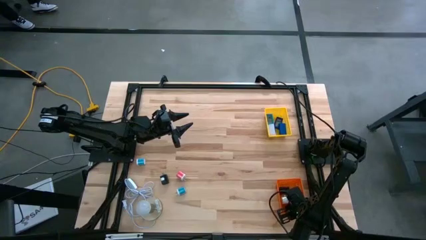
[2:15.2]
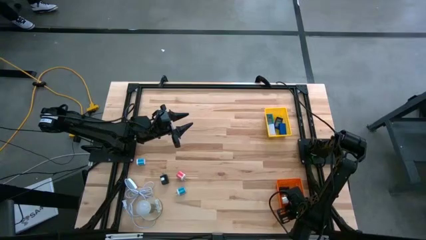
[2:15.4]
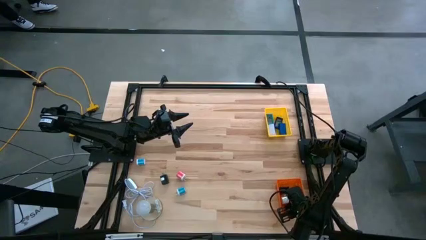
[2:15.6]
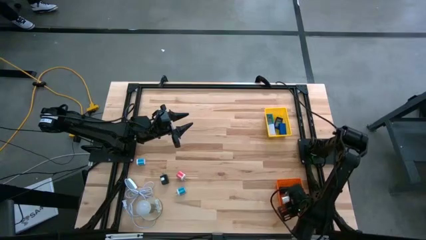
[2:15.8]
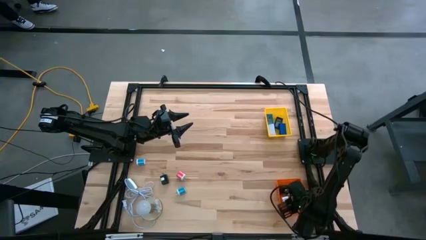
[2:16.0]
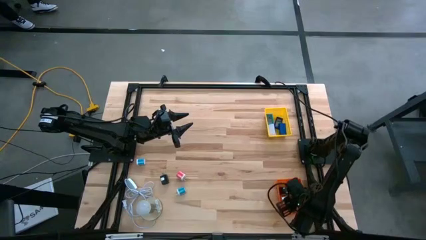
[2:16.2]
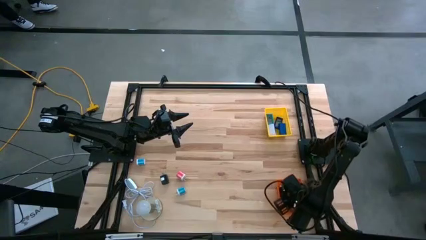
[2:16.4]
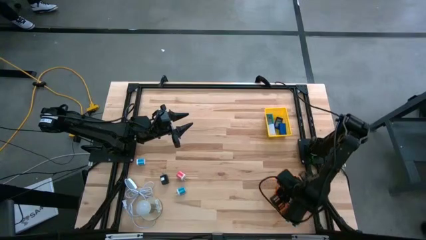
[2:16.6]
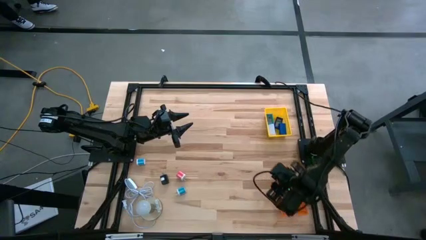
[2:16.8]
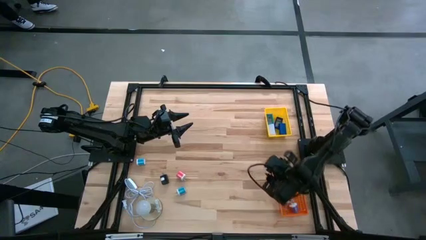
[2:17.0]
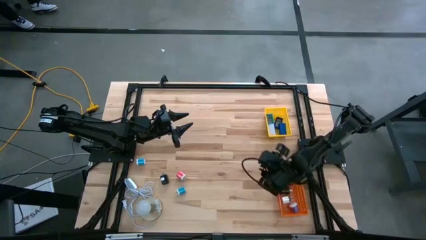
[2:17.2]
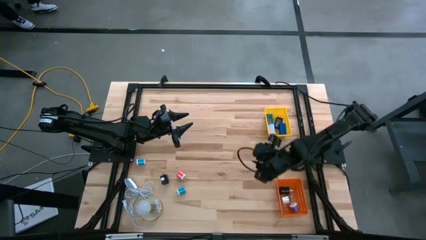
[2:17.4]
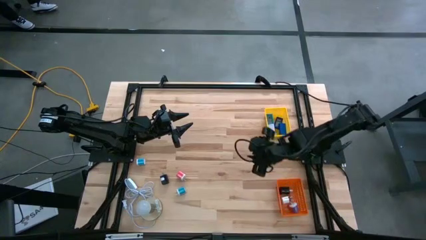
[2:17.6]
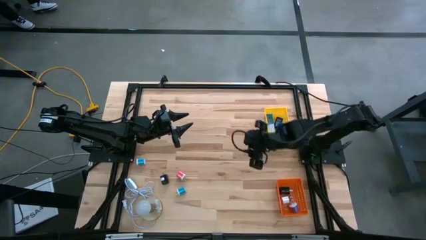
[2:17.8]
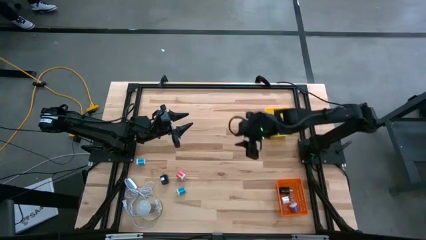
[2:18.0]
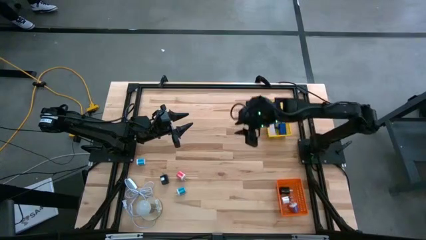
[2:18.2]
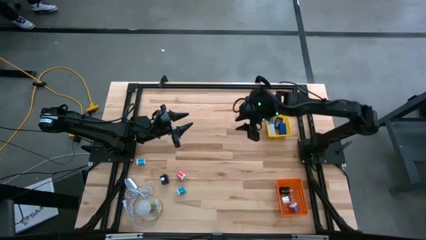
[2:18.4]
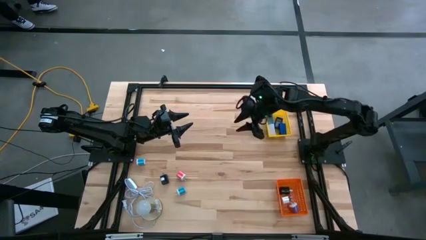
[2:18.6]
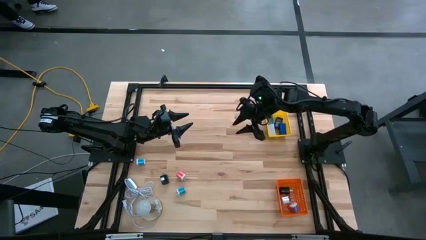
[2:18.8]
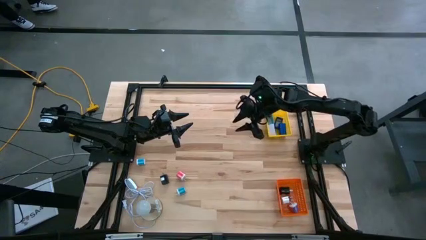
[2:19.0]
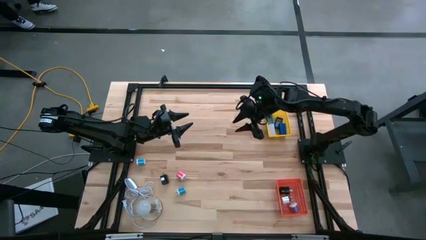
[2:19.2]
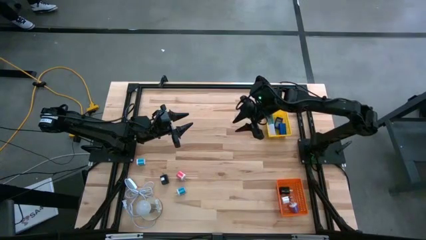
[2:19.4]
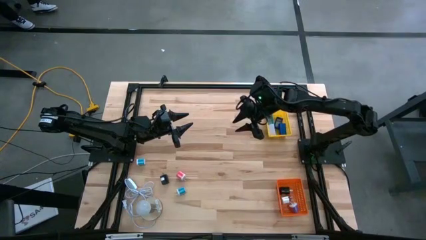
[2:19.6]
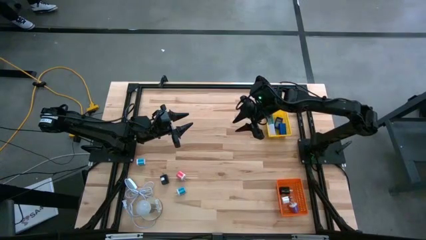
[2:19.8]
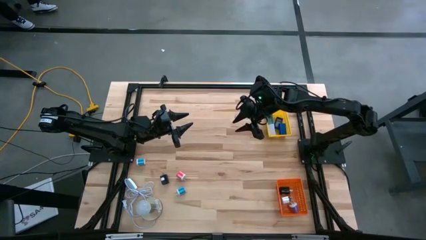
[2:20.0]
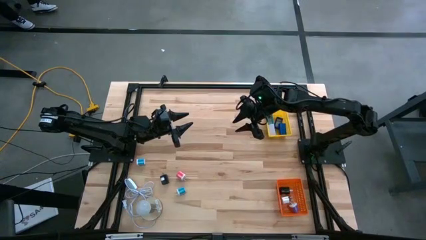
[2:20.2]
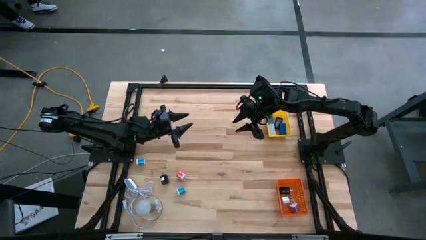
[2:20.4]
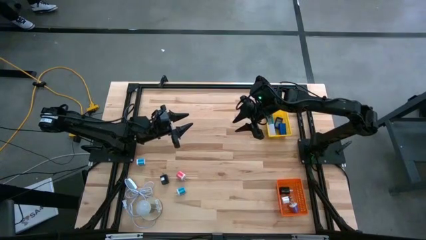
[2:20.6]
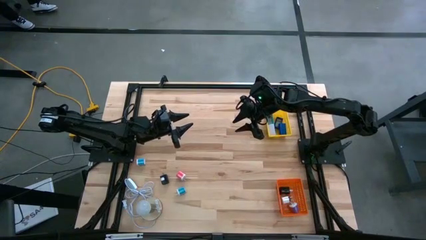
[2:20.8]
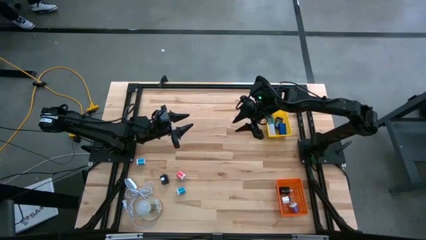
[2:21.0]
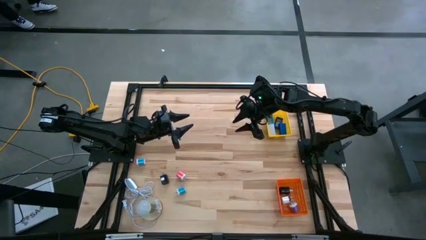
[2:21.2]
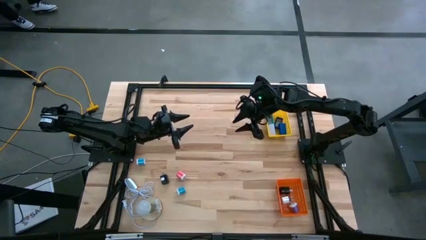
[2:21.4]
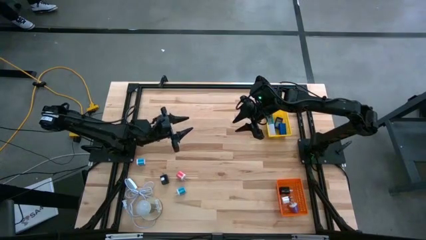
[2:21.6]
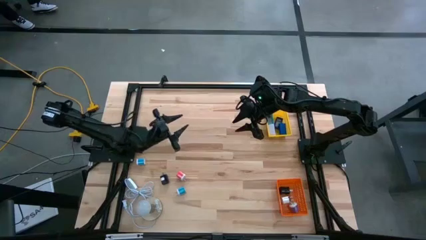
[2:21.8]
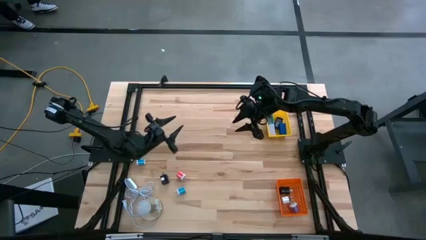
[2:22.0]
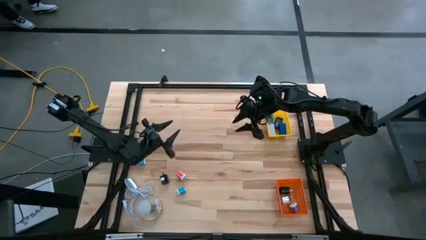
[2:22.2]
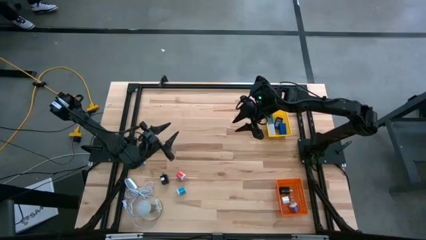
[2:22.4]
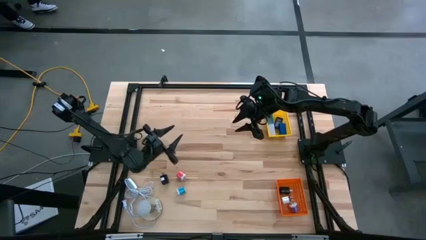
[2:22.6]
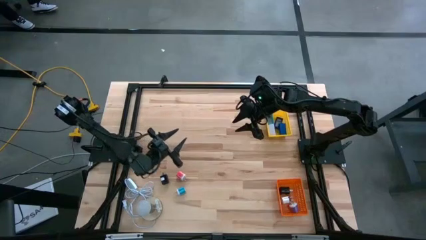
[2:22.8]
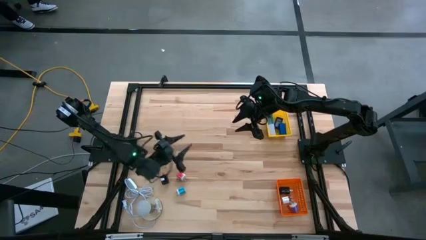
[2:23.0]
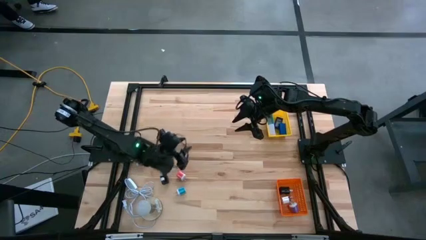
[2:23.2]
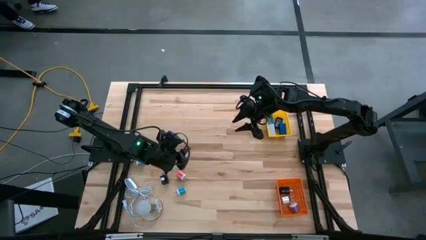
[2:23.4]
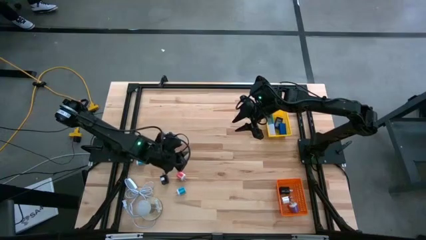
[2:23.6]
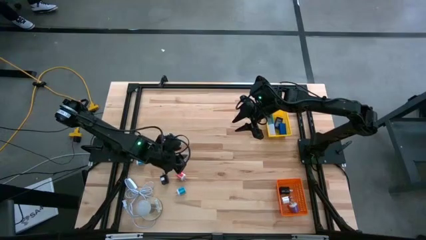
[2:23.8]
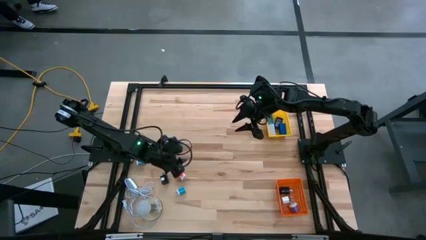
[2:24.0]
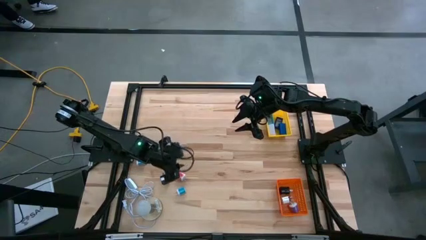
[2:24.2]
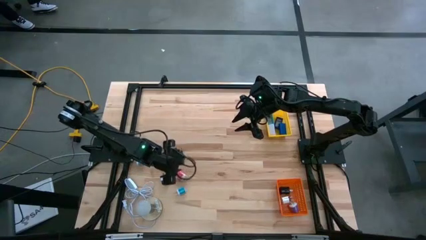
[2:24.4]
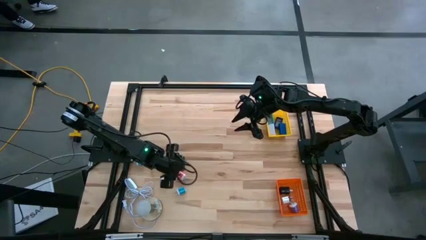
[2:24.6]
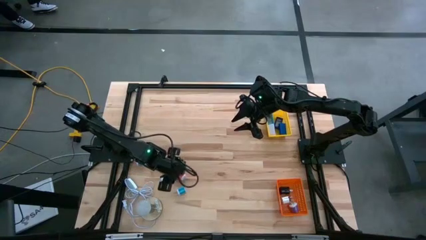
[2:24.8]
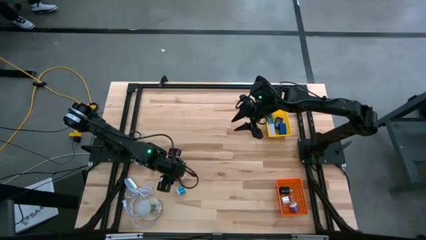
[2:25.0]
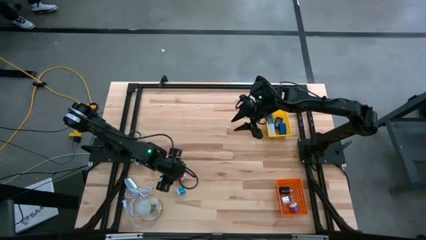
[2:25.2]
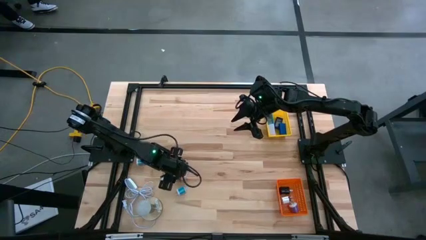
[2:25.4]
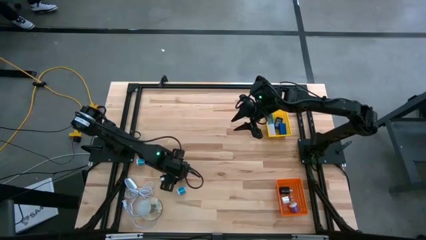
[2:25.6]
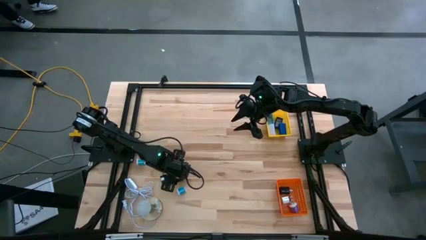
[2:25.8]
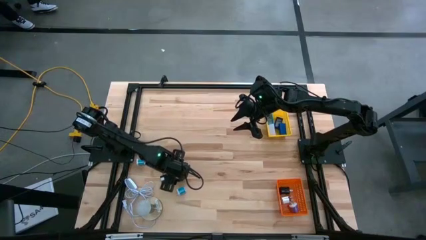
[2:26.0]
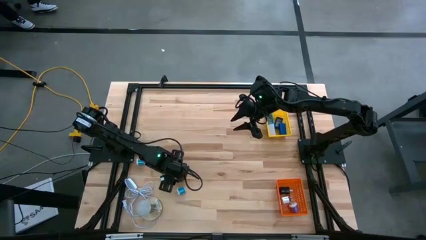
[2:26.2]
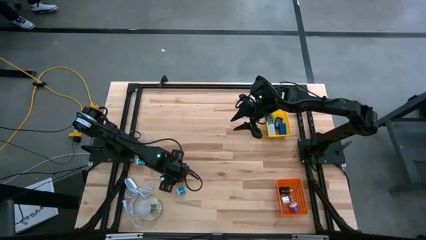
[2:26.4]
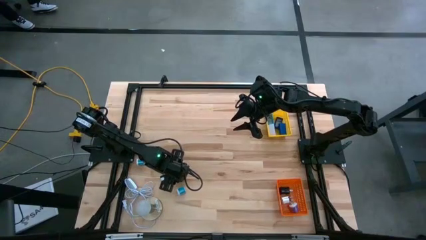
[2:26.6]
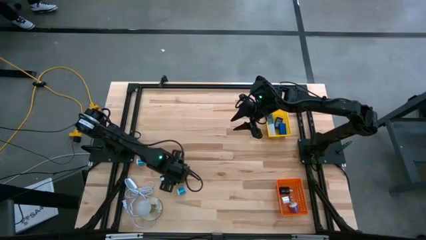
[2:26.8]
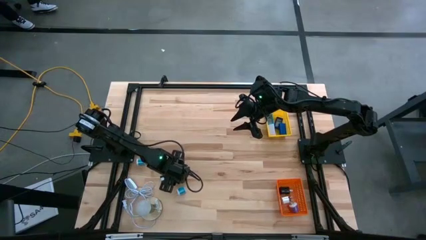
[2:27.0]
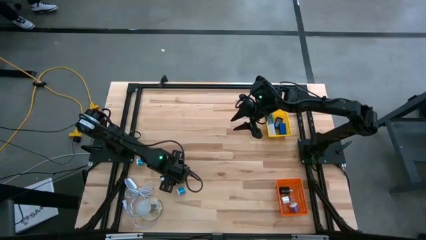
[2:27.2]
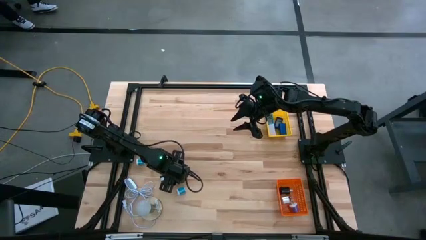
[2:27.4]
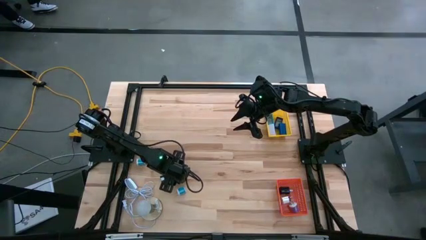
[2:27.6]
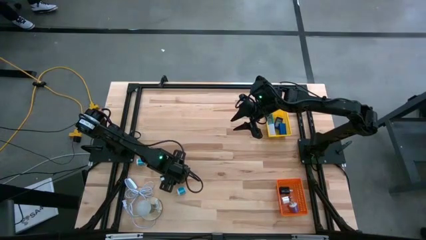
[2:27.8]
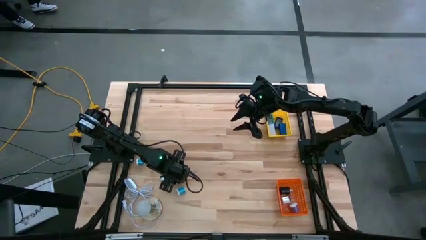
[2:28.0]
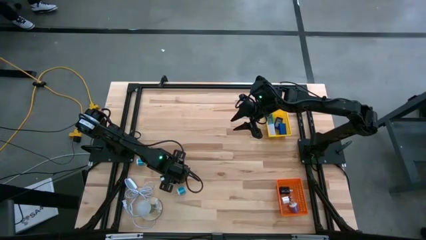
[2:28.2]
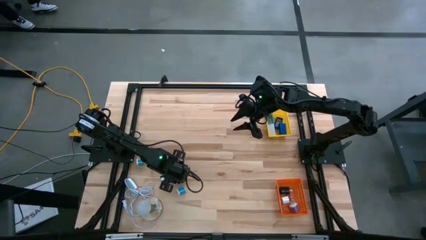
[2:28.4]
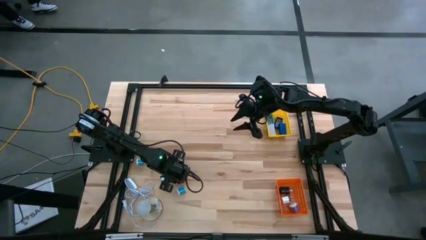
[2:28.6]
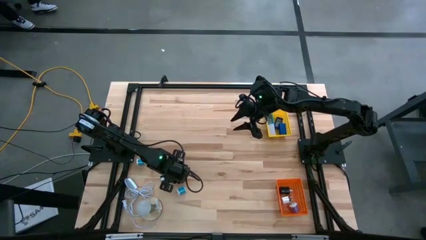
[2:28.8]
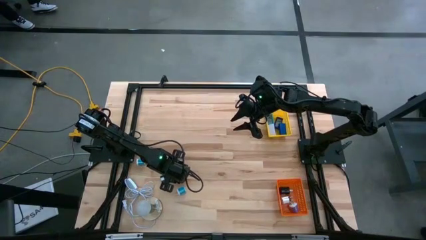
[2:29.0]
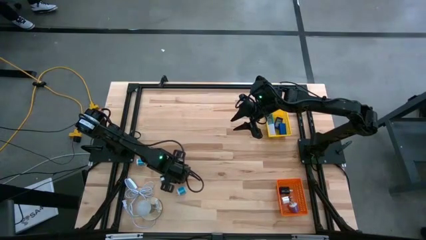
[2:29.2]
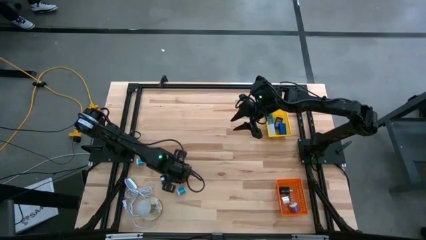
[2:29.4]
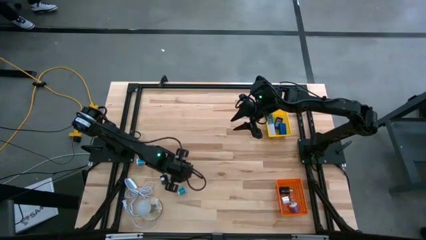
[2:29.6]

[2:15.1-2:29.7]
Task: Pick & Place Office items
Put the pink charger adapter into the orange bin

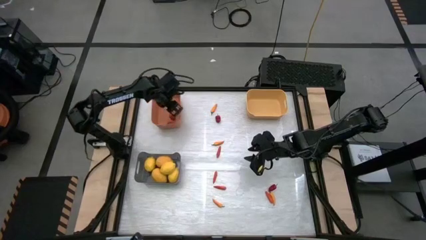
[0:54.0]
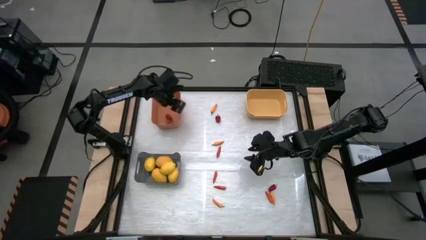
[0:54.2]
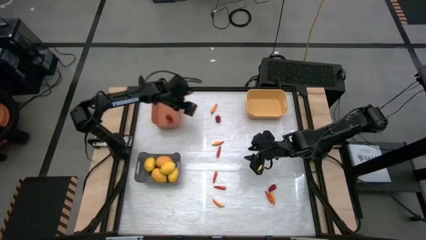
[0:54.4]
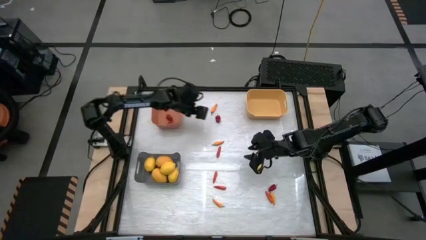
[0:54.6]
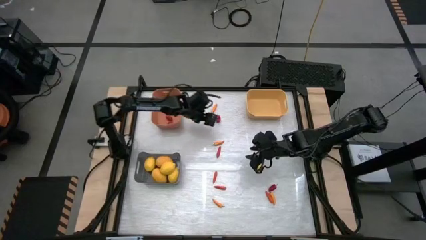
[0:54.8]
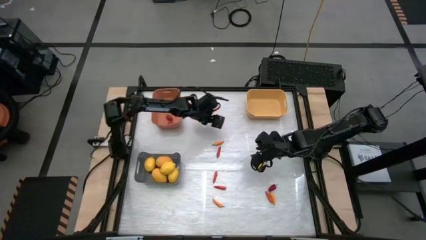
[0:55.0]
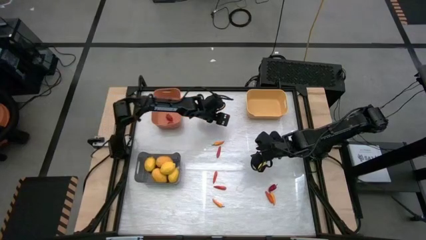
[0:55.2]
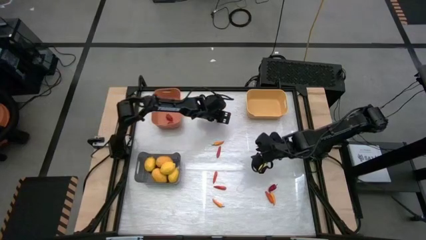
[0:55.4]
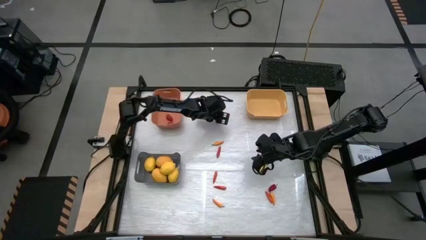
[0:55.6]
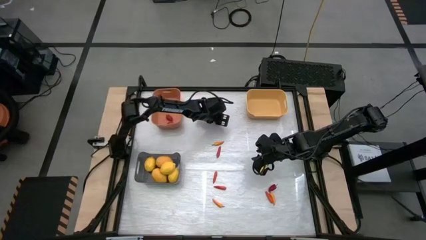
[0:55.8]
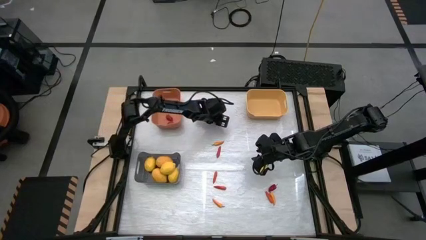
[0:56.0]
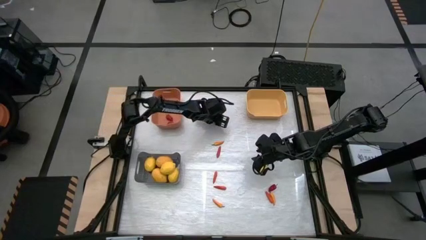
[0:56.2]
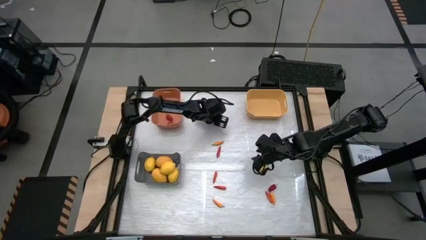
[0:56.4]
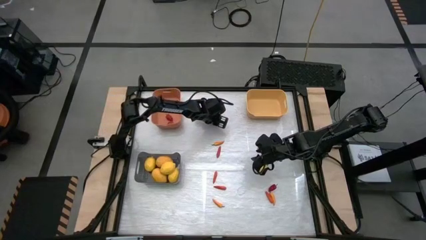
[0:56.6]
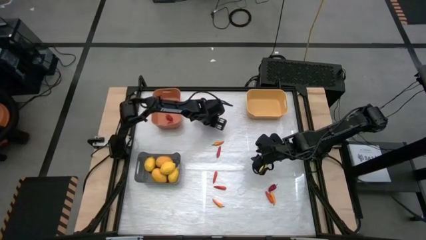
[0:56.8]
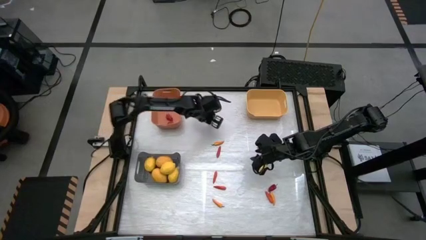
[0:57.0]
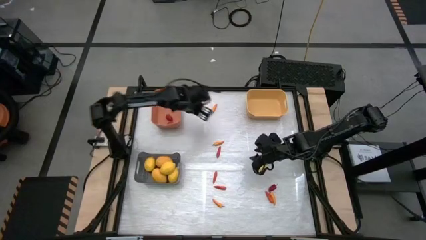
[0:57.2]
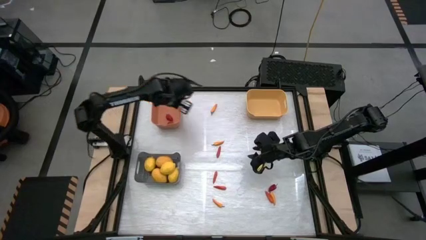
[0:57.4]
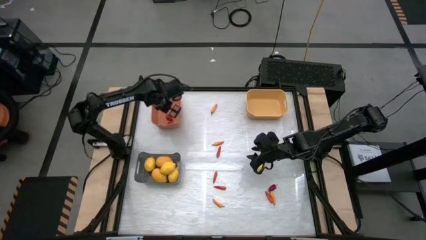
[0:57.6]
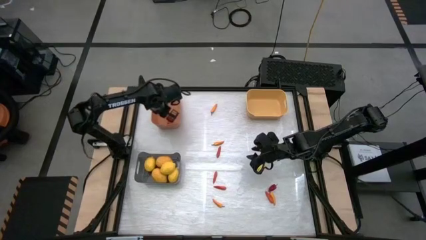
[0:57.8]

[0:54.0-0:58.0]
Task: Sort produce into baskets
Put the red bell pepper into the orange bin
